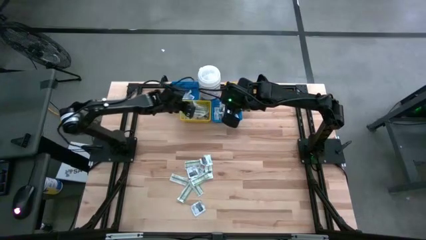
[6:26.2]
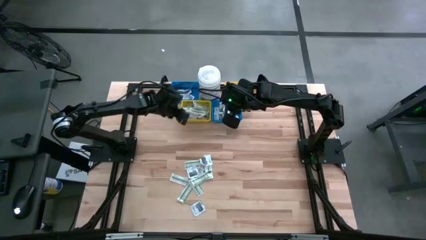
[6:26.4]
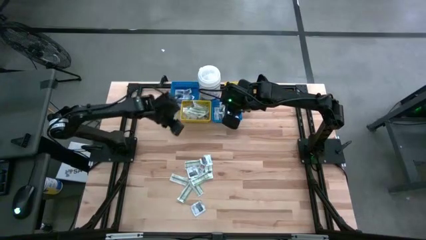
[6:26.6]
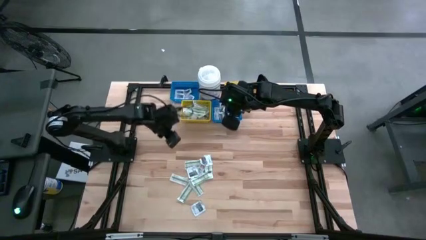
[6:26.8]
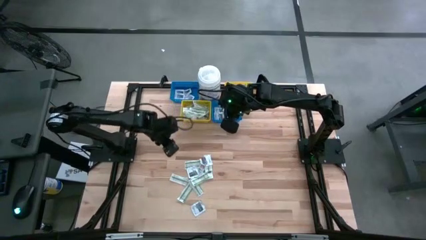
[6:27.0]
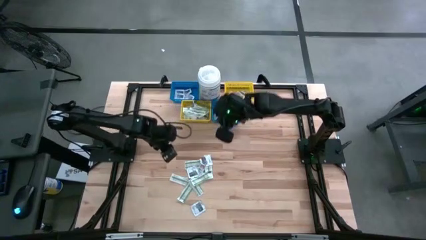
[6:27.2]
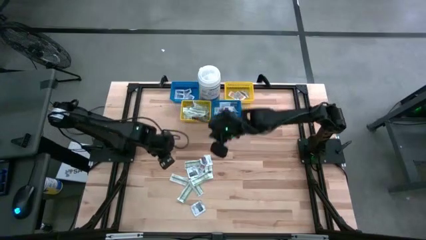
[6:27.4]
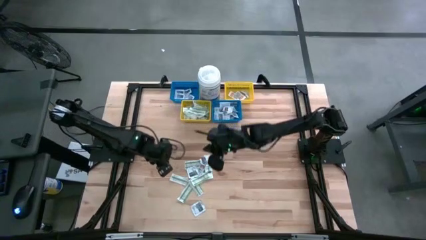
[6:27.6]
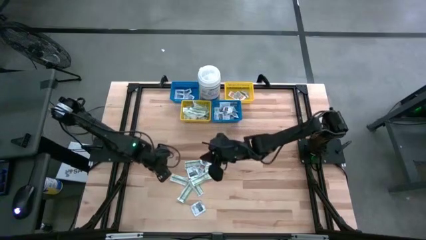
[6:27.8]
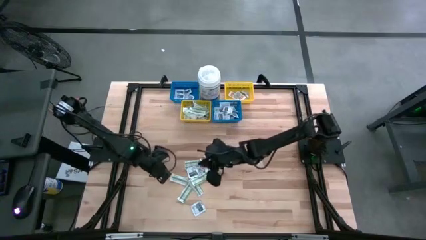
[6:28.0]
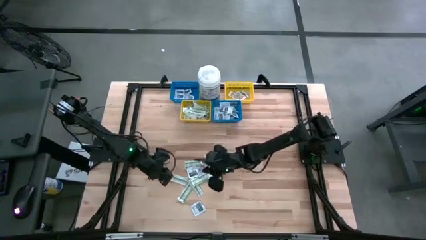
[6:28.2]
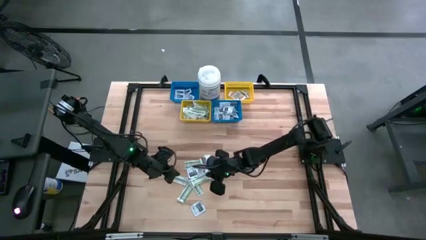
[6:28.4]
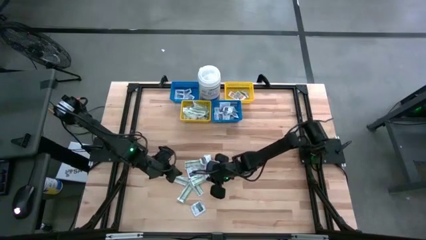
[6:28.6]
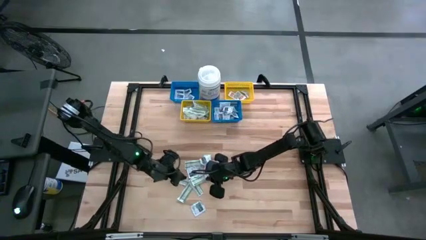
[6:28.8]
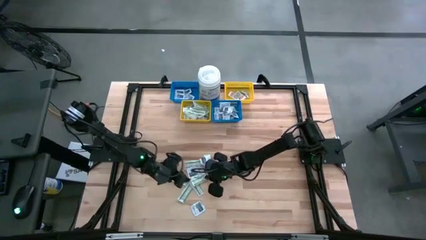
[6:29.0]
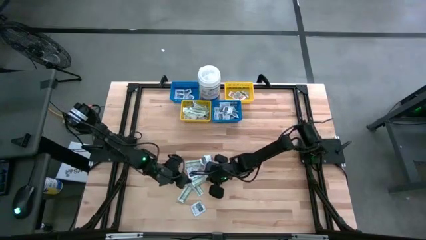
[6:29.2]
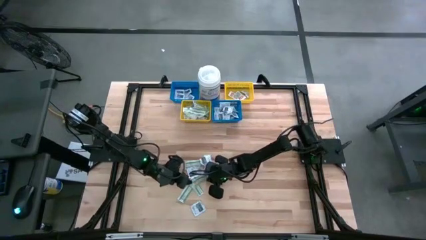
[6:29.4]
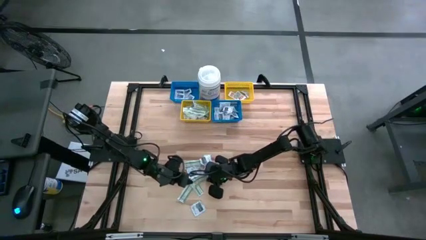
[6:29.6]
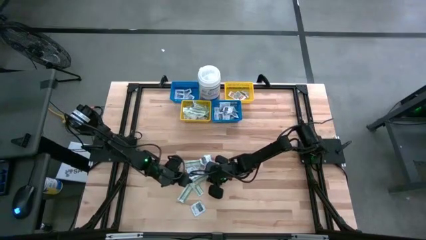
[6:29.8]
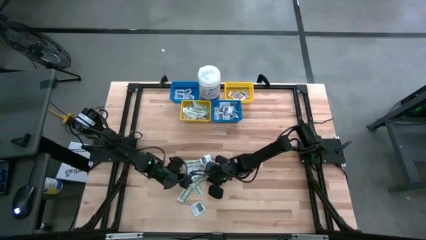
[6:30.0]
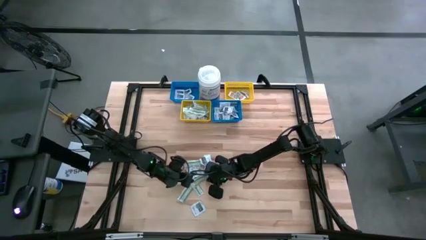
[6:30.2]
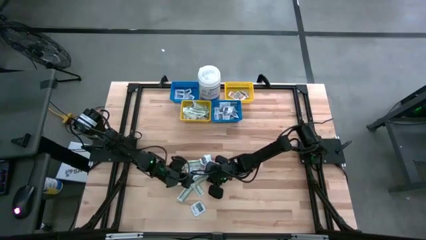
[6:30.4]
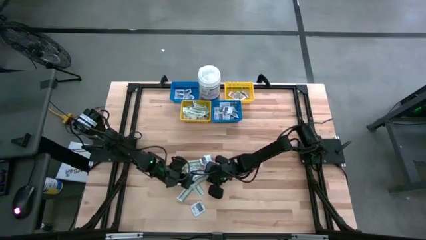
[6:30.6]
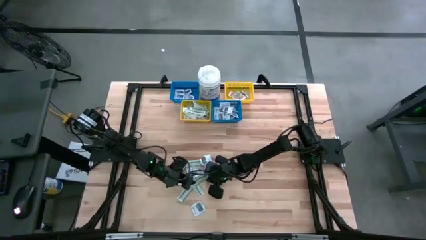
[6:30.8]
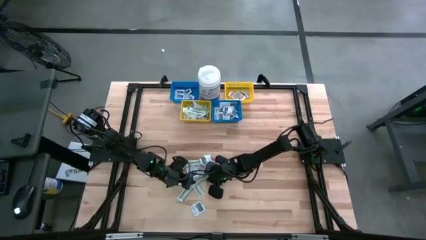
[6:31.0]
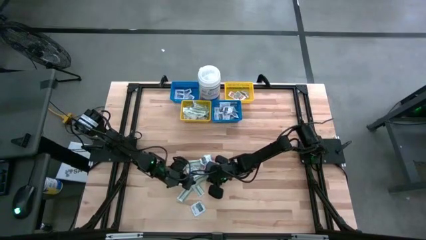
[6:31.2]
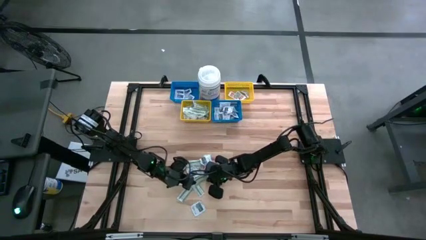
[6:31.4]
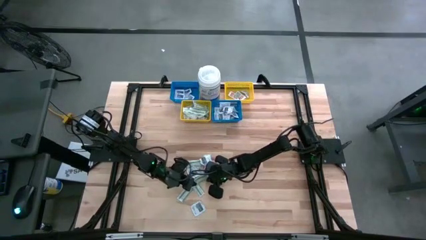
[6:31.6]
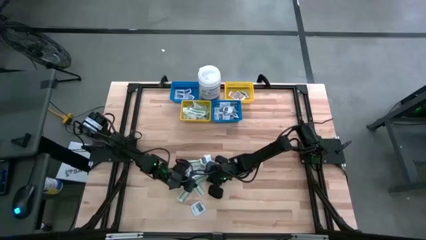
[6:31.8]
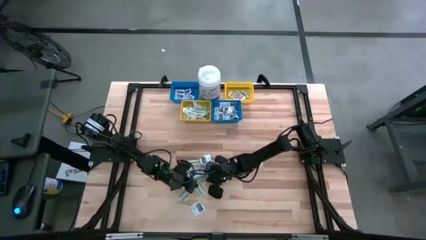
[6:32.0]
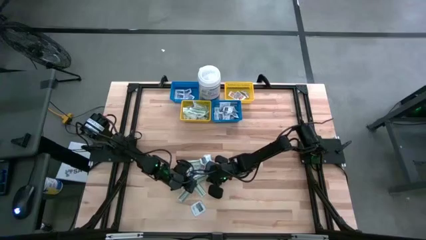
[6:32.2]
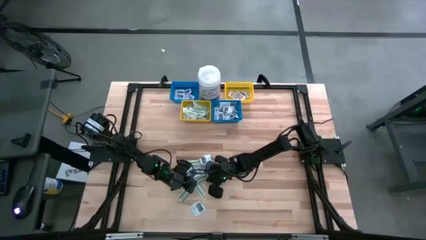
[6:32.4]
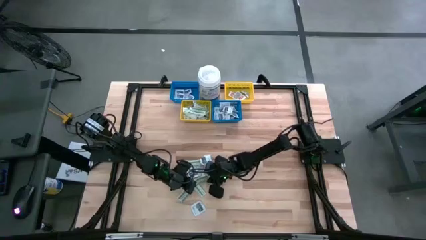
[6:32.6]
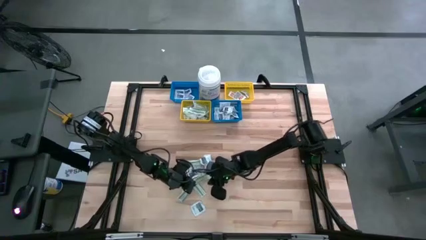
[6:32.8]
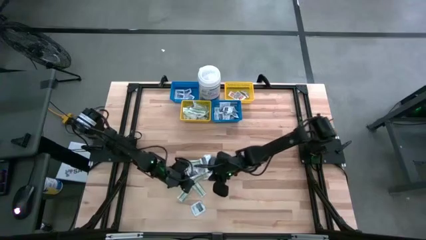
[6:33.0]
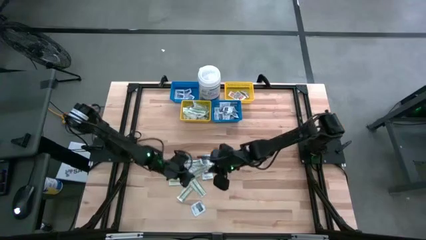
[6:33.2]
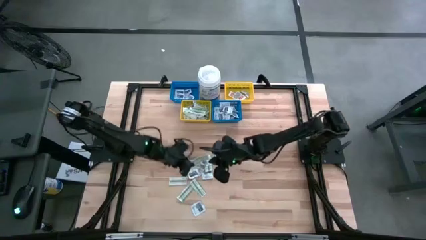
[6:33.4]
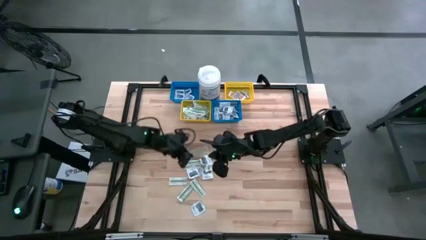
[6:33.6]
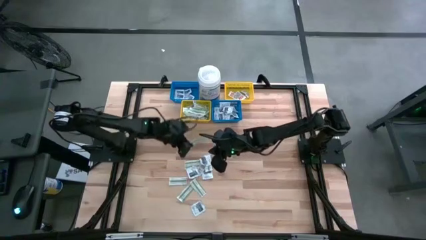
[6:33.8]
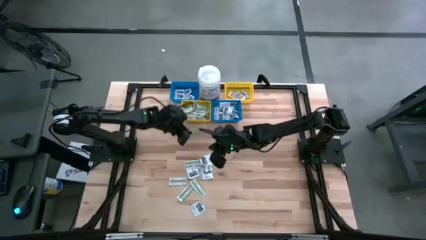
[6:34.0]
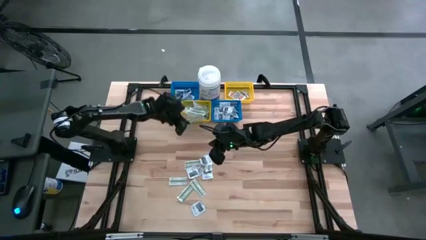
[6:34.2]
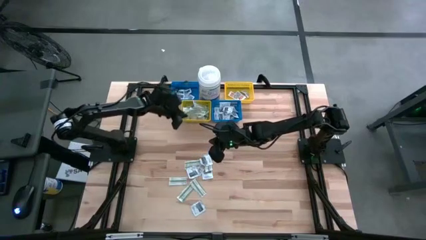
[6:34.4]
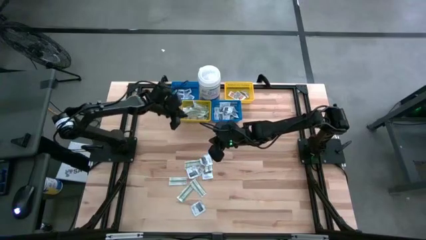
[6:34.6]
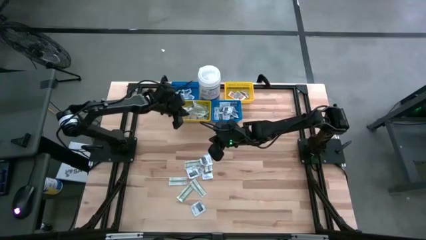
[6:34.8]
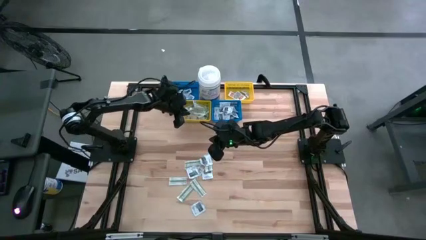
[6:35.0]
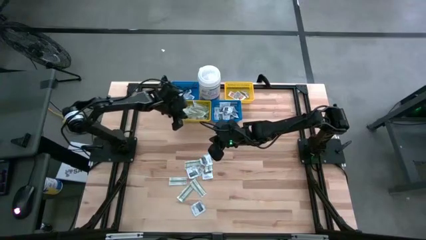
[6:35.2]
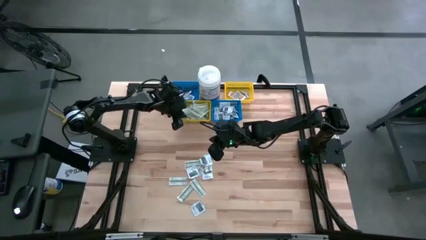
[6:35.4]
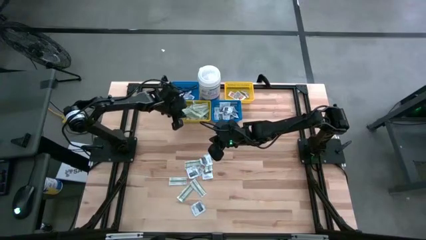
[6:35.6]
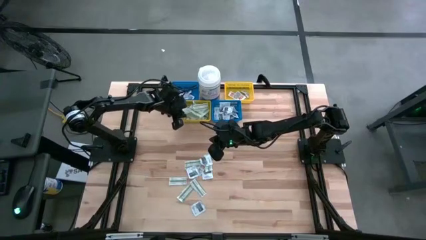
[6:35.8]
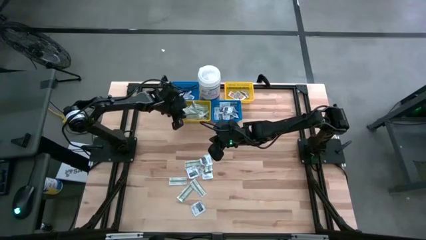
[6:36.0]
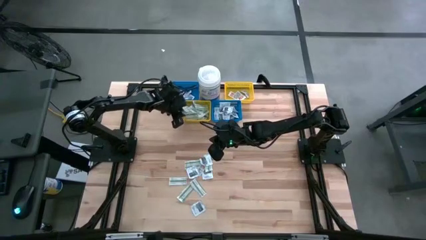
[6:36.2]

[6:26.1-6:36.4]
Task: Pick & Place First Aid Supplies
Put the green bandage pad into the left yellow bin

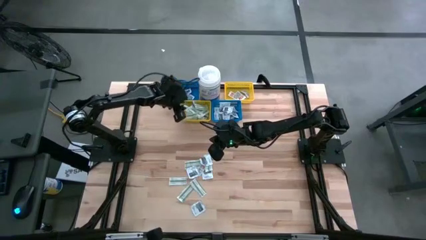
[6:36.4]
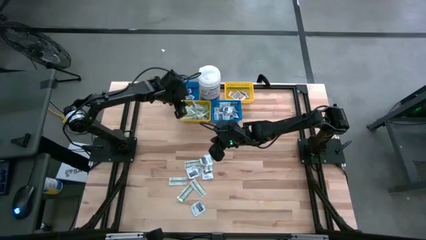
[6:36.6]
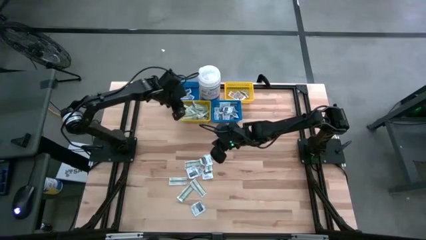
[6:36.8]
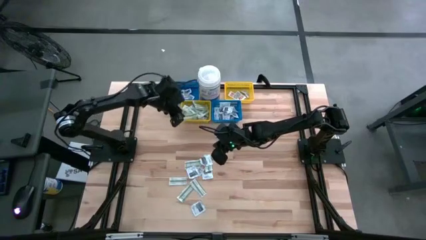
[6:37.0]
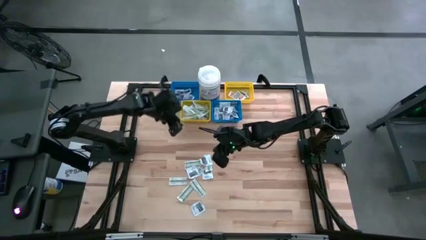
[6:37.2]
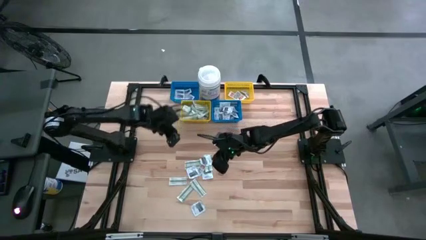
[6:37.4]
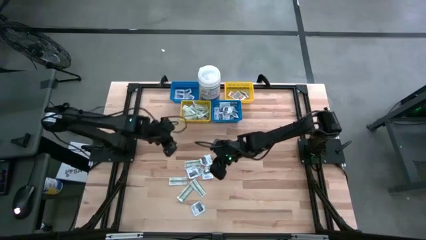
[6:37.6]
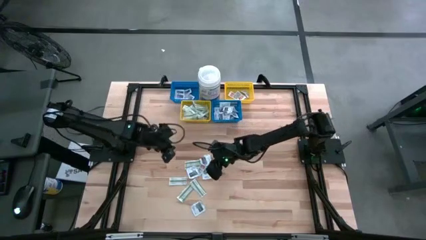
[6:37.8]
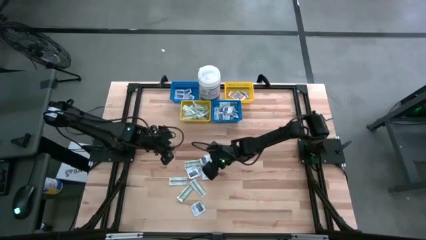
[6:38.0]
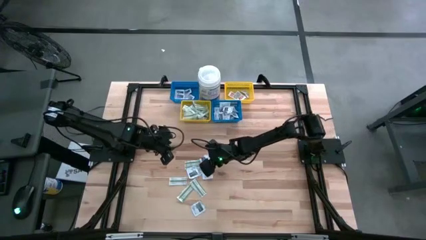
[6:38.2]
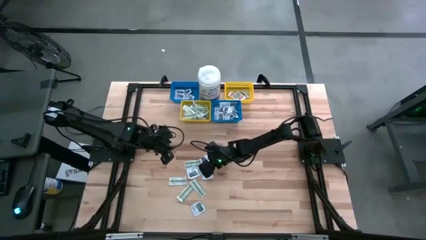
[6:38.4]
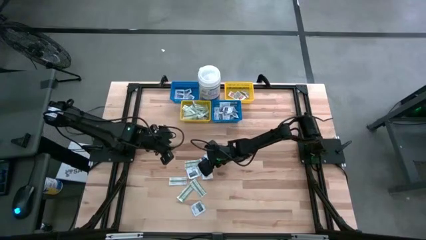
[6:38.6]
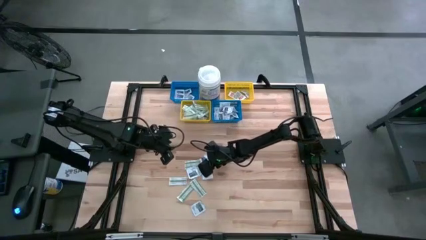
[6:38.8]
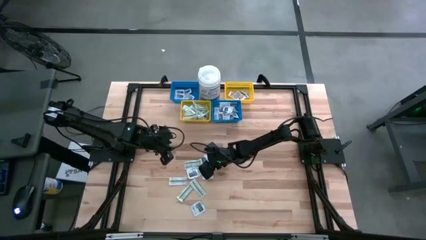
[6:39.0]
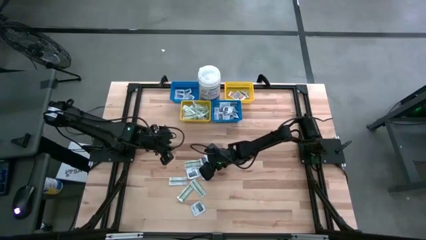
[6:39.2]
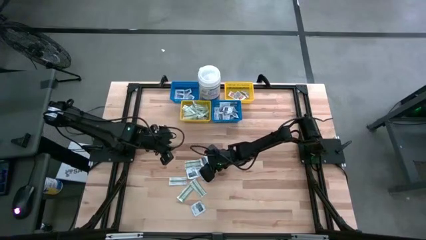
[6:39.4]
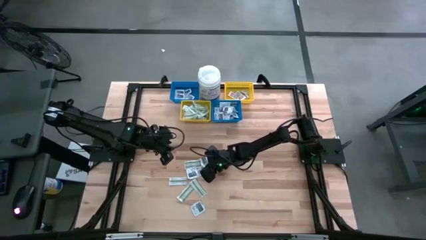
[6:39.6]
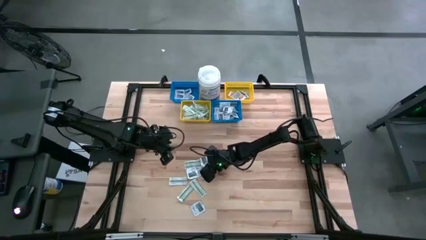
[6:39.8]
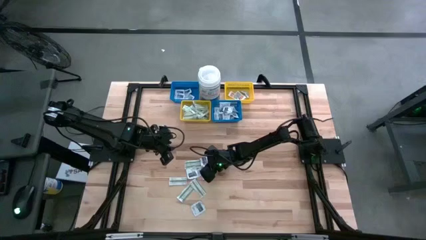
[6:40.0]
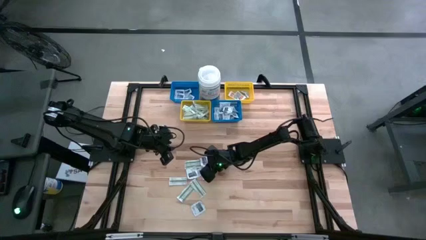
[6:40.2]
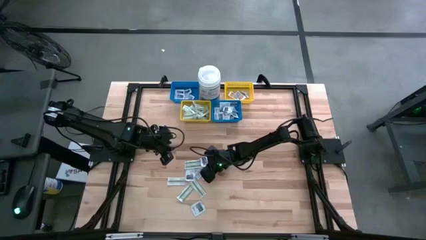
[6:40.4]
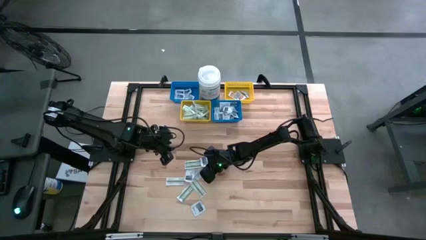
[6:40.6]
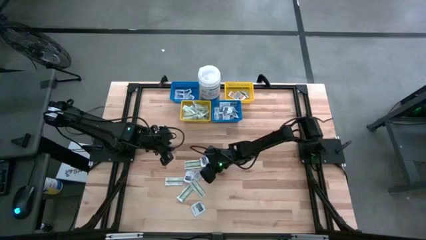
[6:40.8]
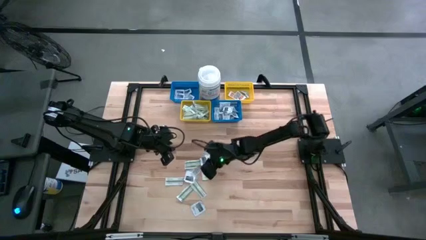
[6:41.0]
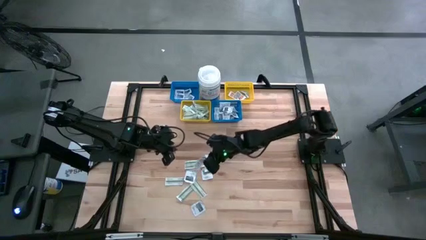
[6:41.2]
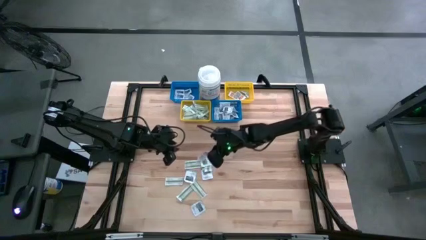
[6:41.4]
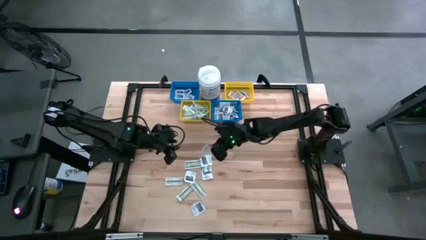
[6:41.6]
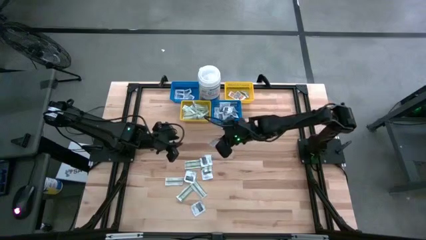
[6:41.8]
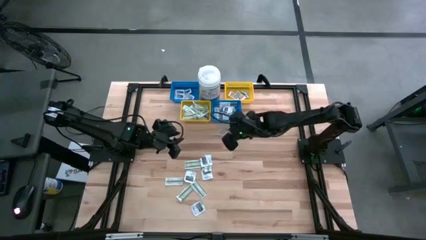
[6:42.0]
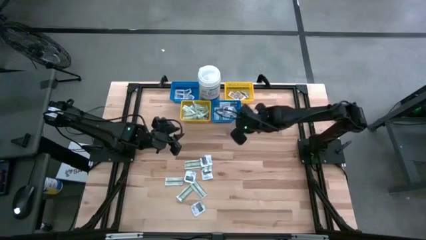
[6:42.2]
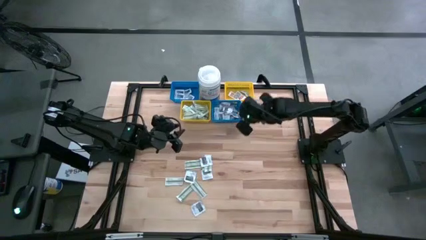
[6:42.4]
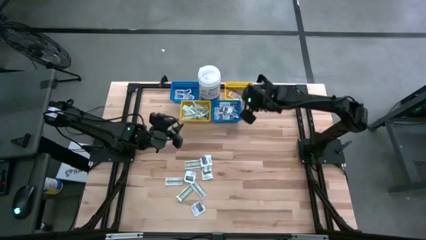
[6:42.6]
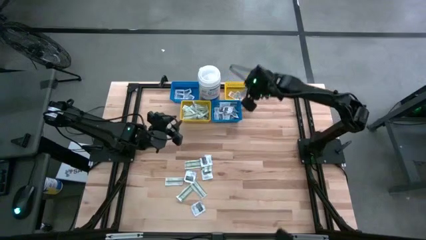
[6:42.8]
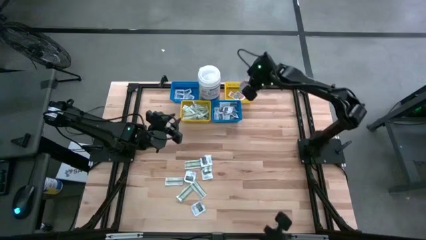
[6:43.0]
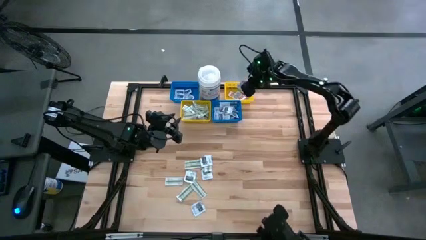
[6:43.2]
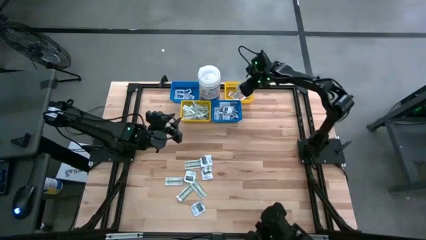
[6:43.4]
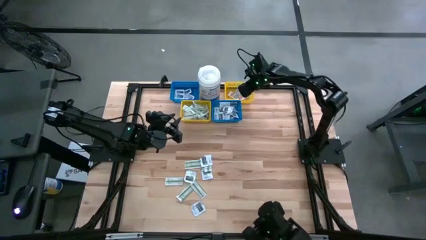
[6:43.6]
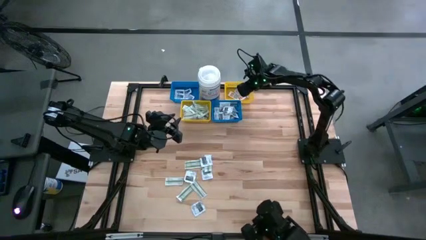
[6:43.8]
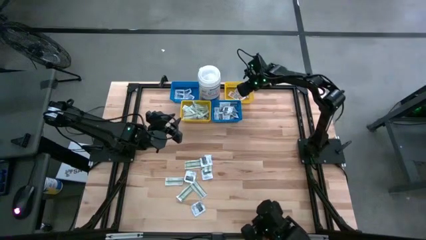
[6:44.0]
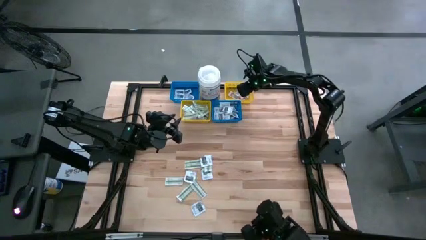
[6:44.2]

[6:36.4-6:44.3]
Put the orange ointment pack into the right yellow bin
